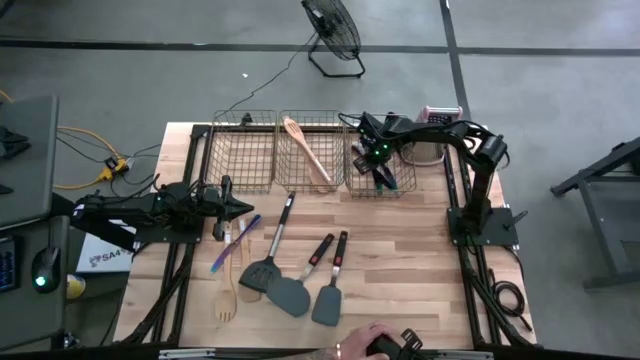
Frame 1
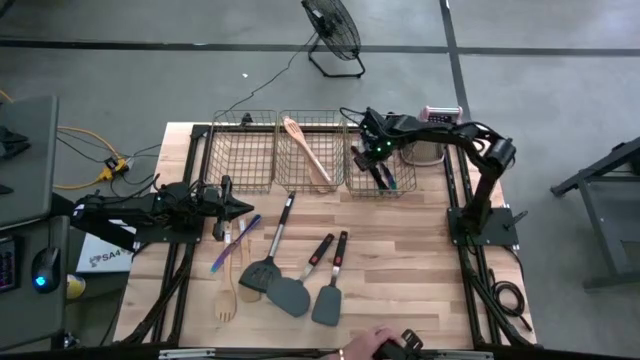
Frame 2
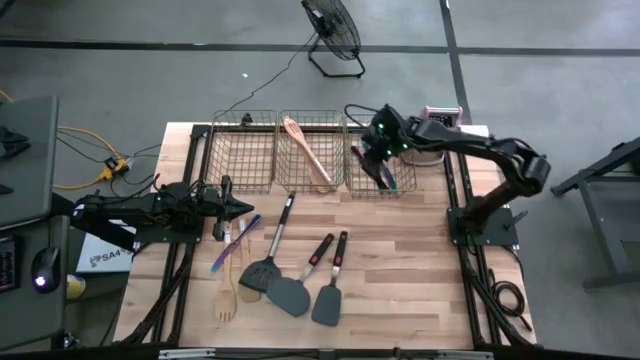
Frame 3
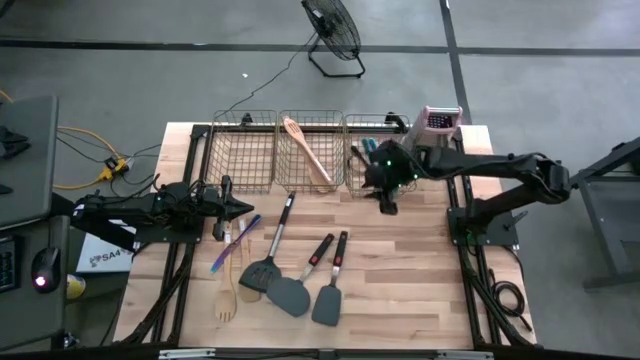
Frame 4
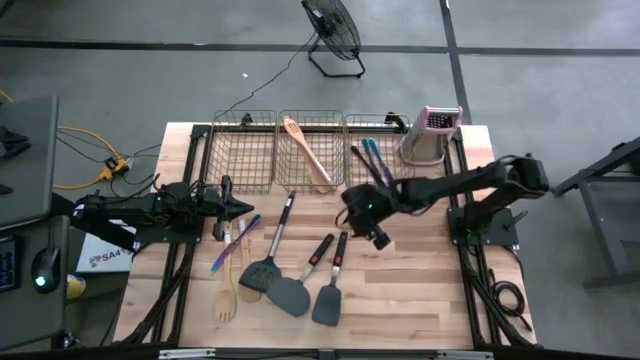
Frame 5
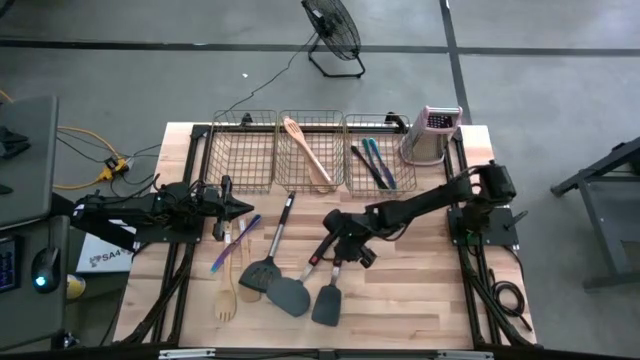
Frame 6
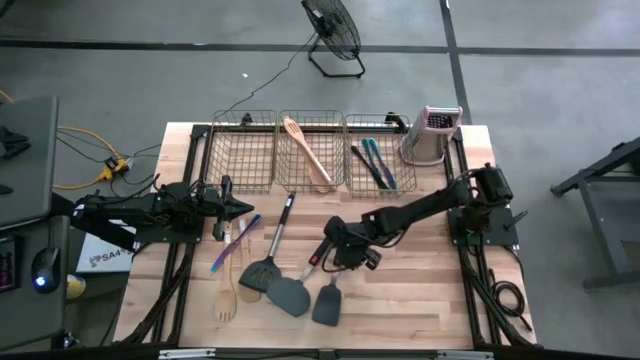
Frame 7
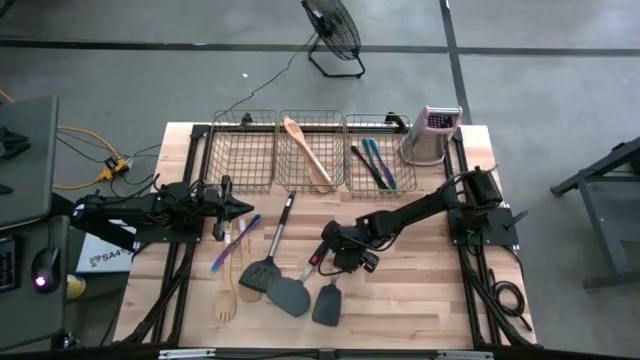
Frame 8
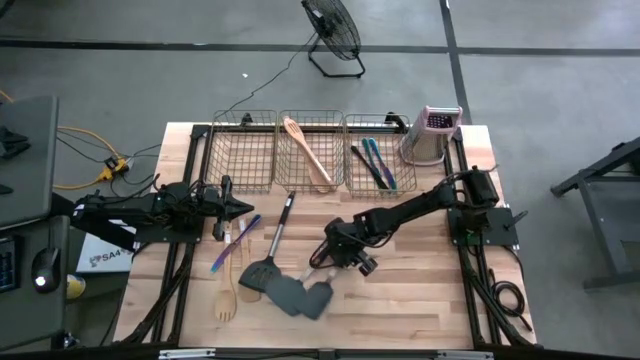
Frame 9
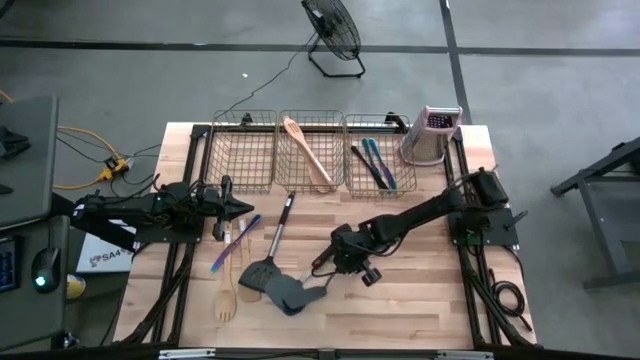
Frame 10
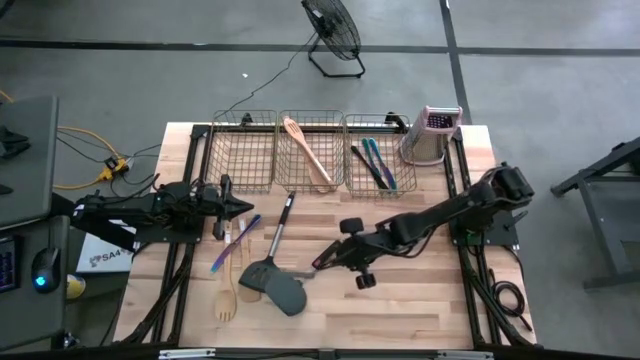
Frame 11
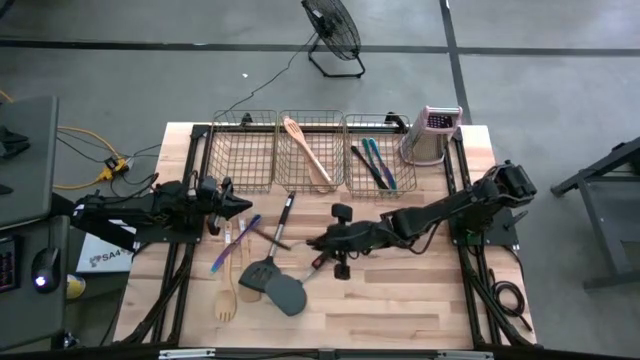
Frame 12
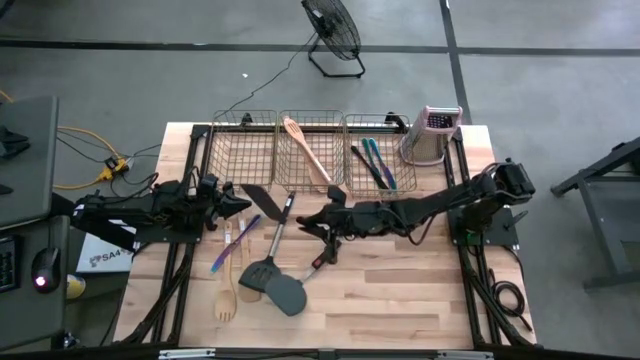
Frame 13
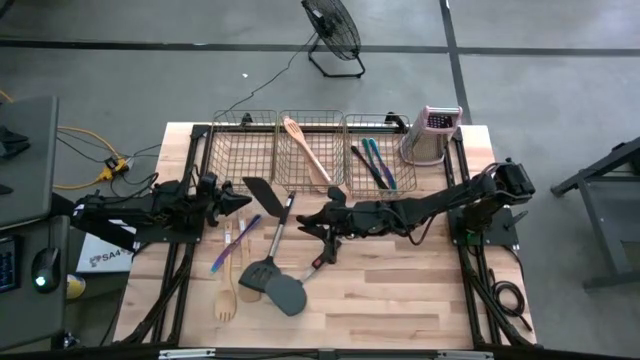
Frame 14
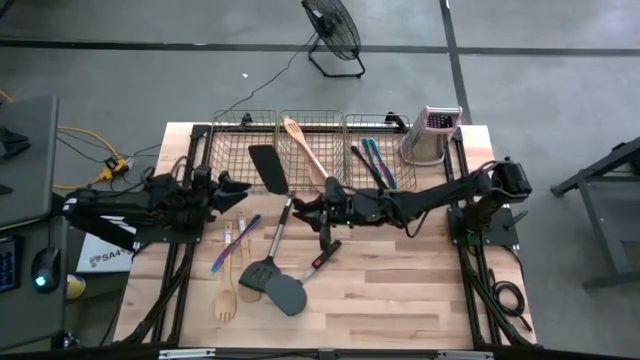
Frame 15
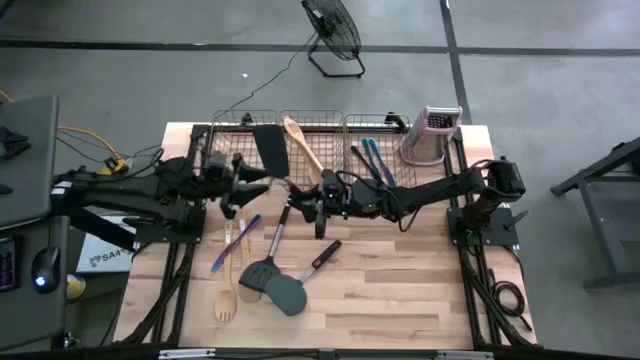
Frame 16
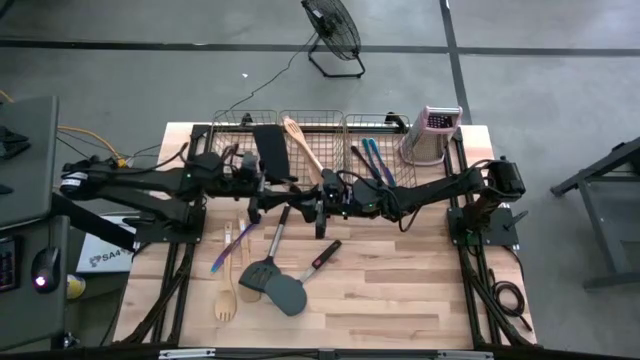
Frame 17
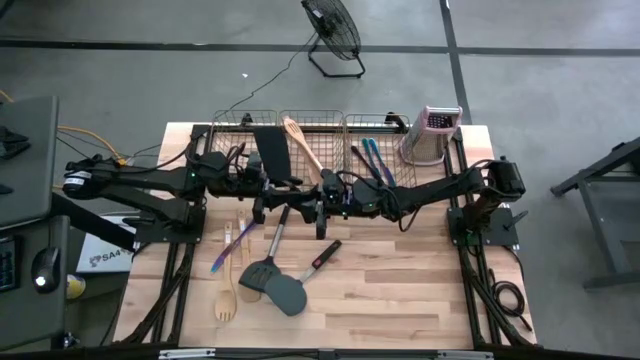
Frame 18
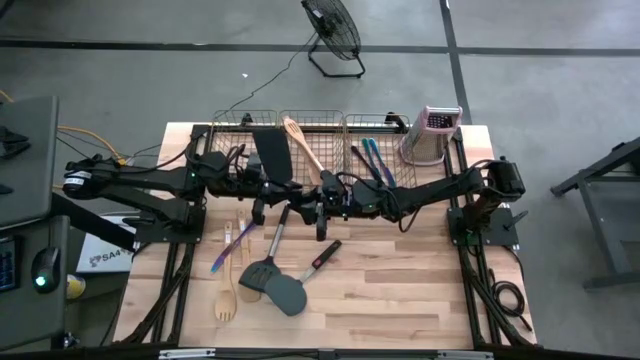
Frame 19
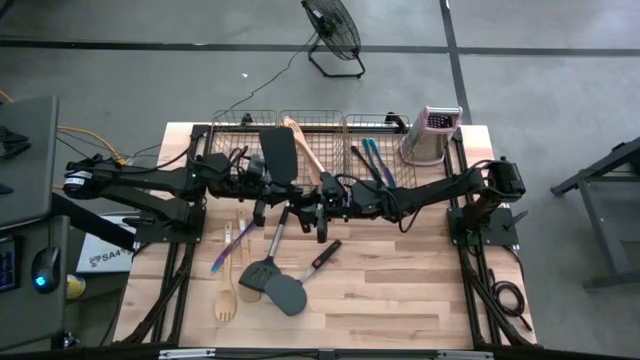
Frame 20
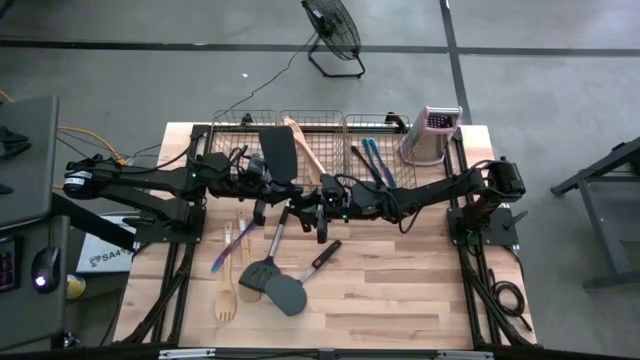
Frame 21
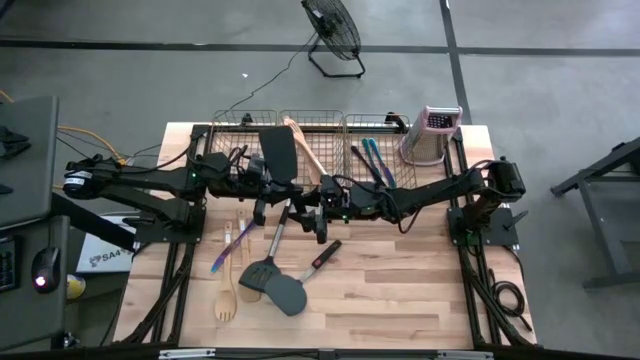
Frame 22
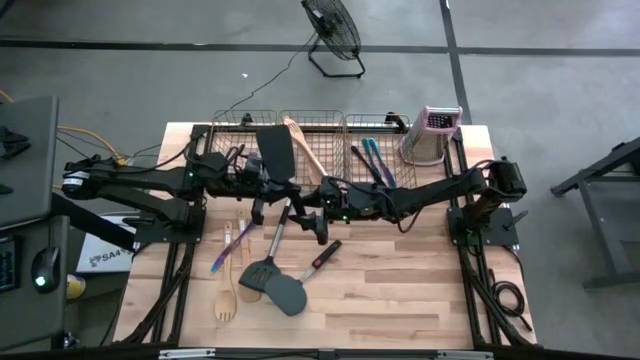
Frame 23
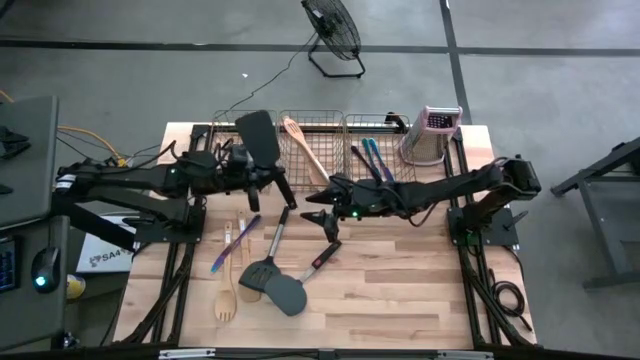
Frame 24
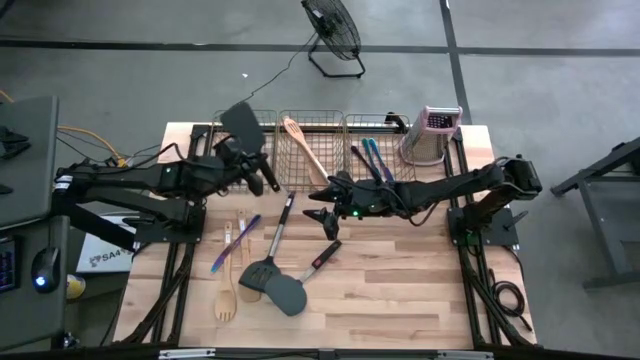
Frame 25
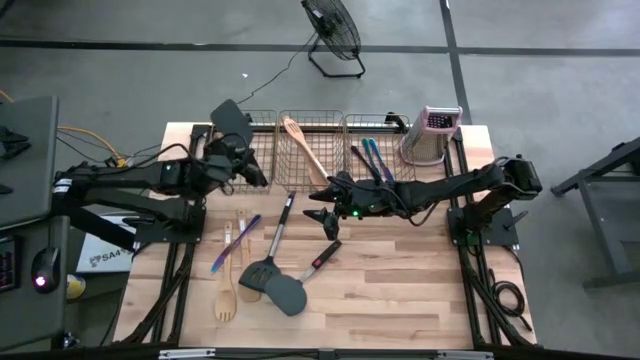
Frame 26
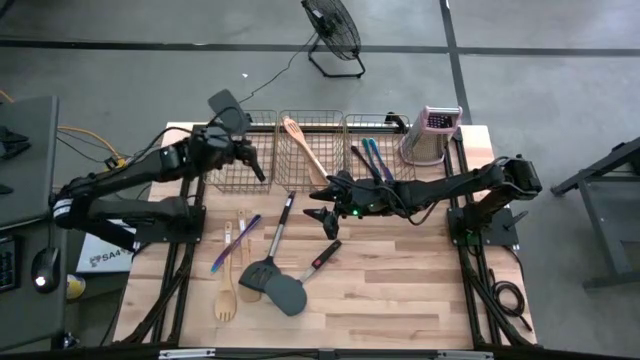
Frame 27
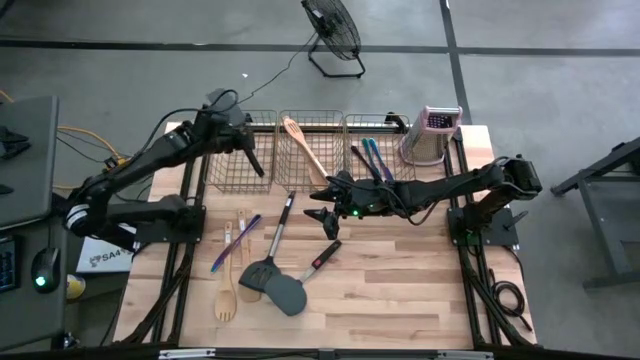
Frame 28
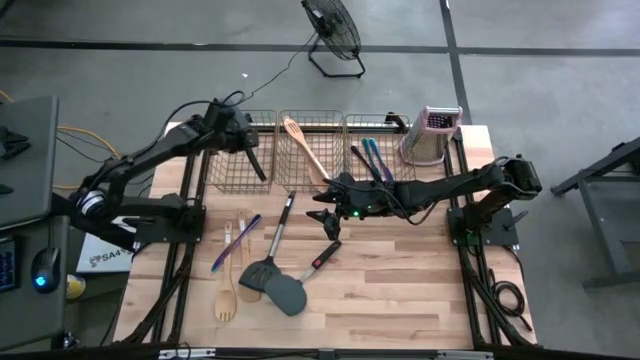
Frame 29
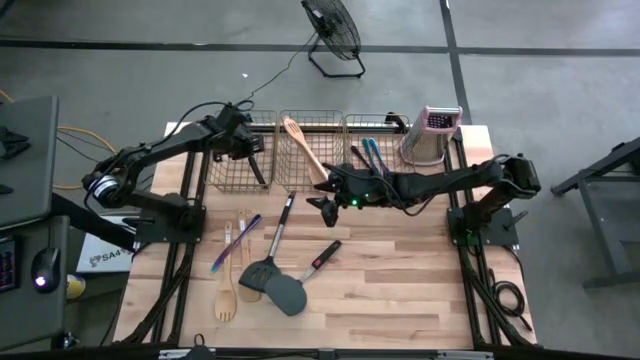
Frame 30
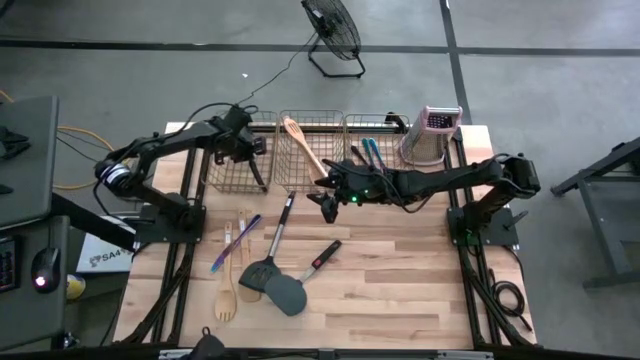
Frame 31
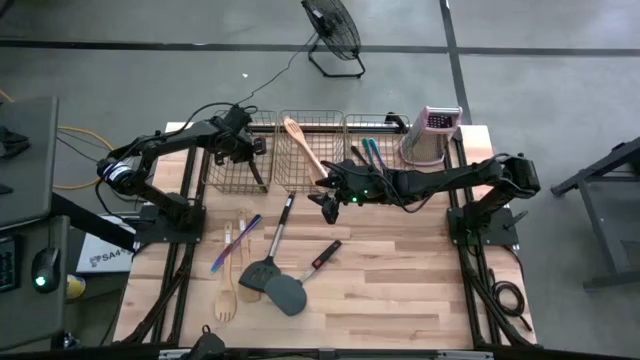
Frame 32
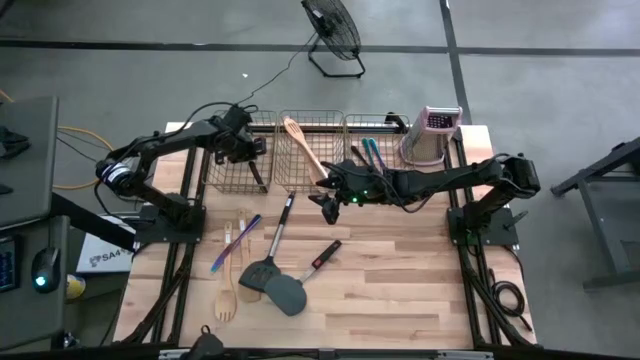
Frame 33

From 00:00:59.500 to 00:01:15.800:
Task: Pick & Place Kitchen Items
Put the black spatula into the left wire basket

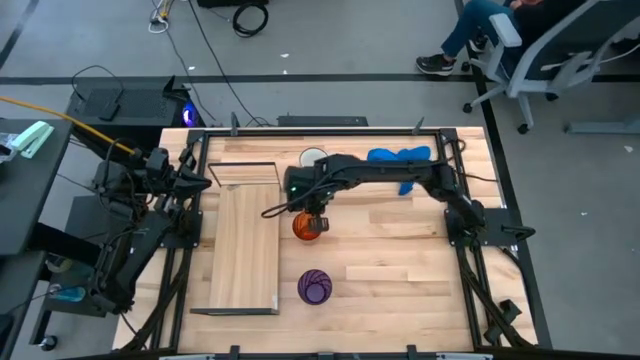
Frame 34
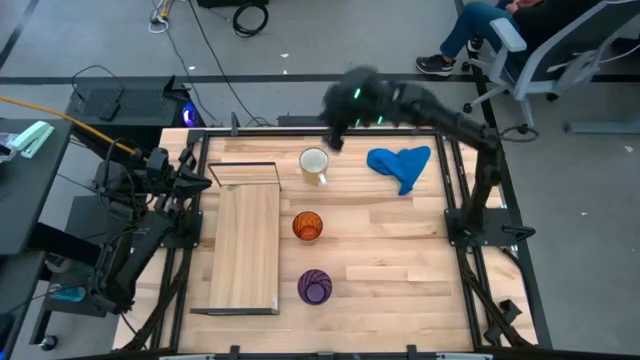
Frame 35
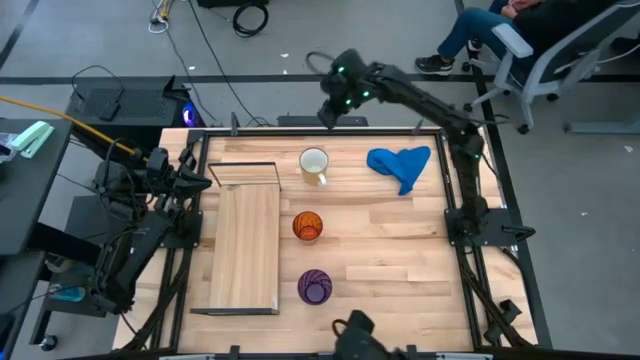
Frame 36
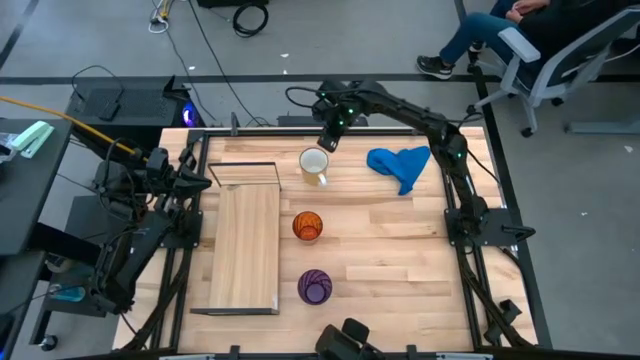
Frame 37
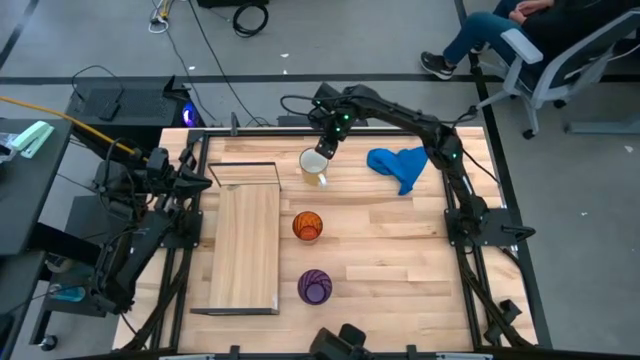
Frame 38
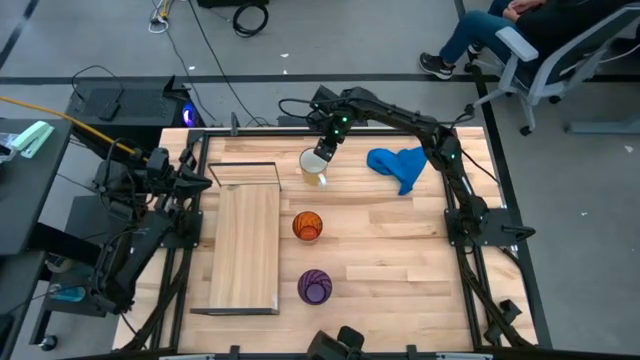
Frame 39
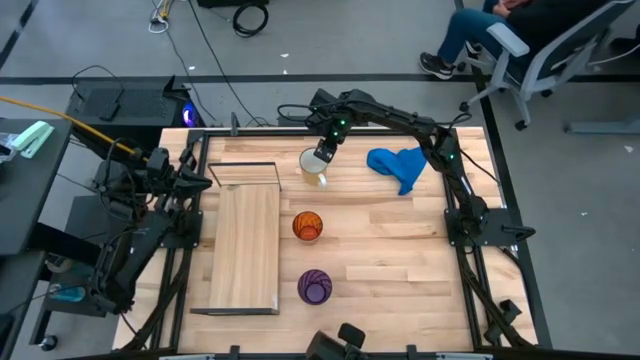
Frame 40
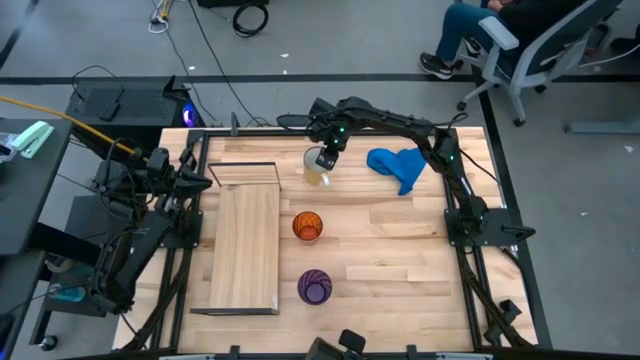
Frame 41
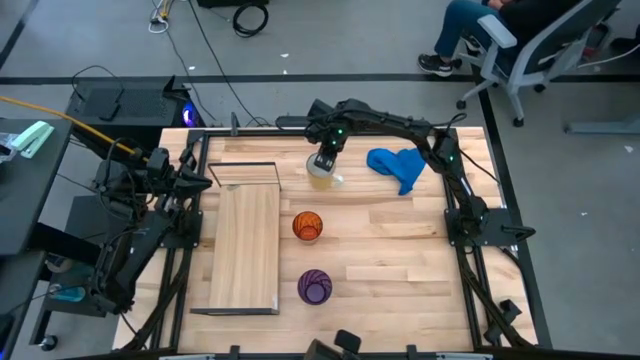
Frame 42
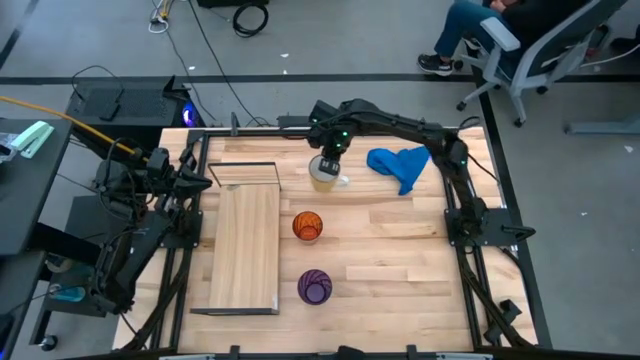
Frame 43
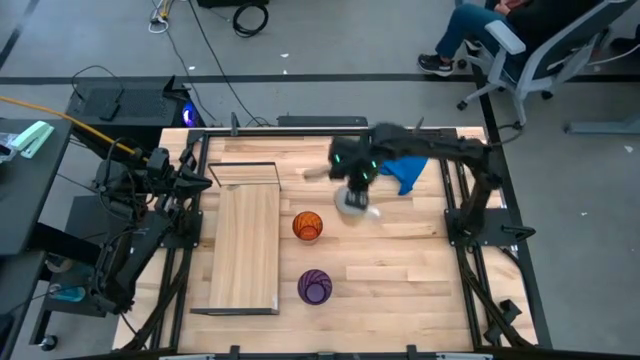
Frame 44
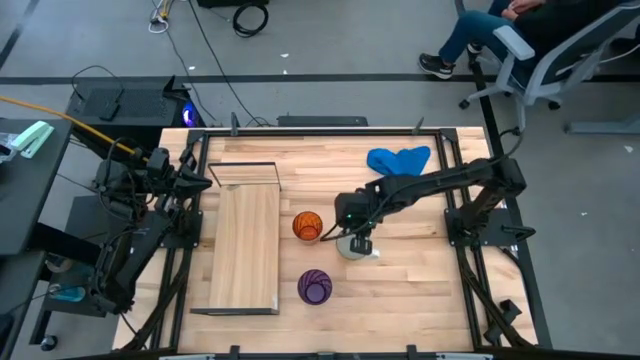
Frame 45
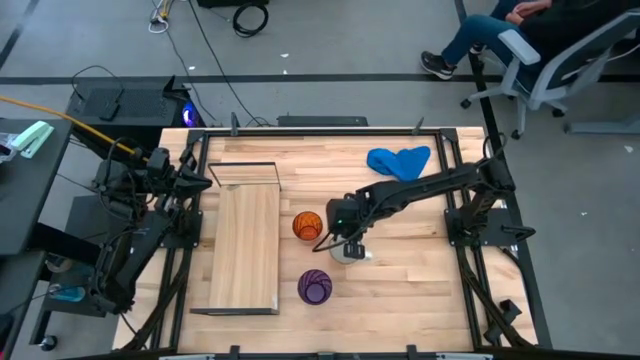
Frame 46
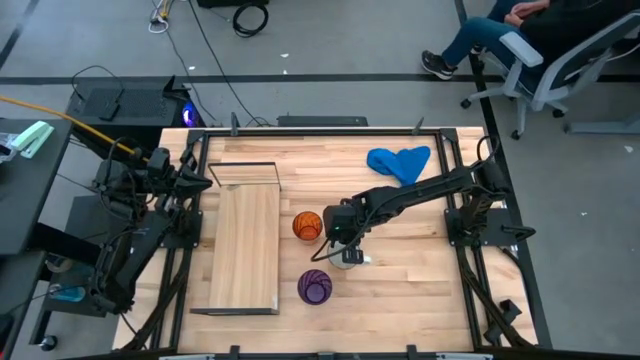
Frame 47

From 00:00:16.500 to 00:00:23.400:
Task: Stack small to large cups/mugs on shelf
Move the yellow mug to the center of the table
